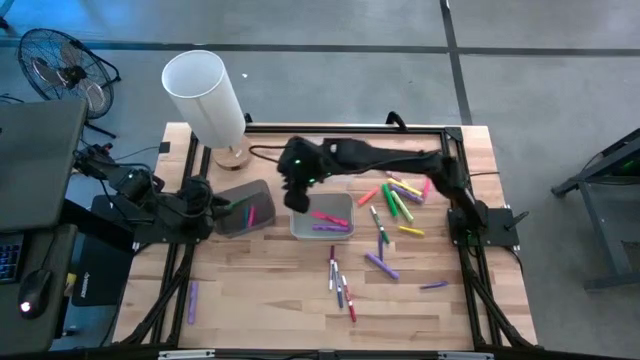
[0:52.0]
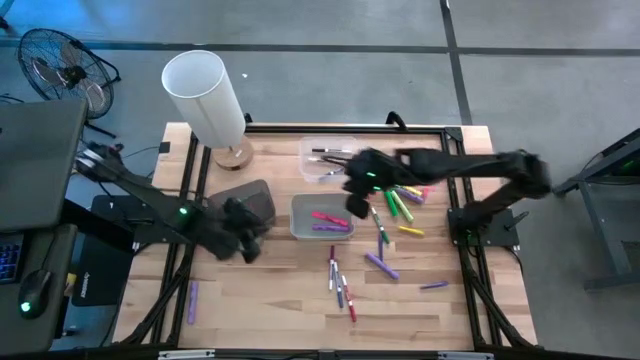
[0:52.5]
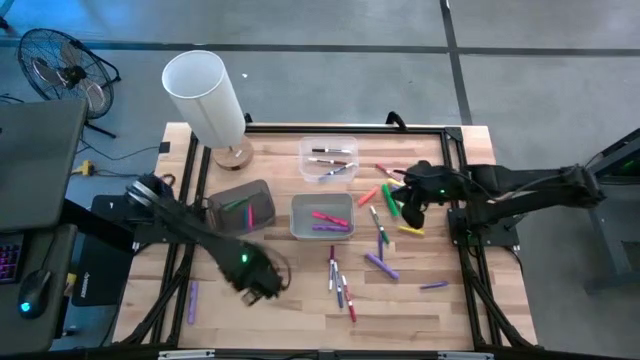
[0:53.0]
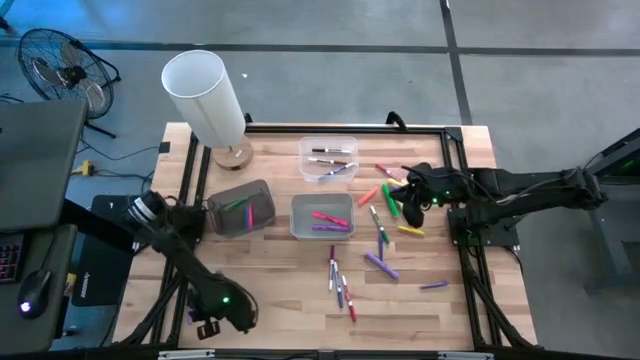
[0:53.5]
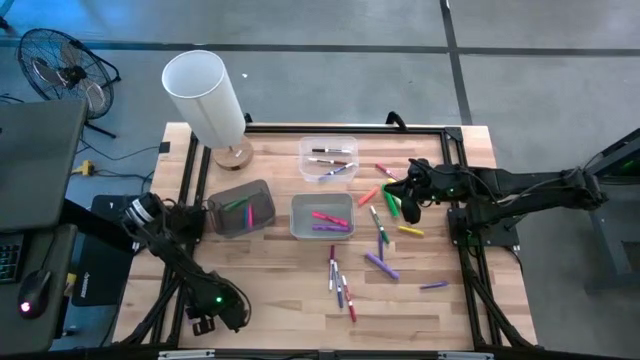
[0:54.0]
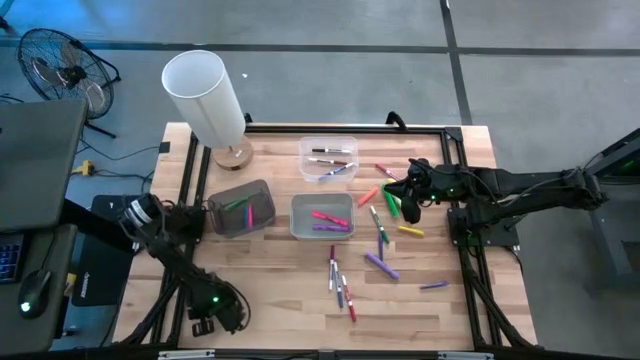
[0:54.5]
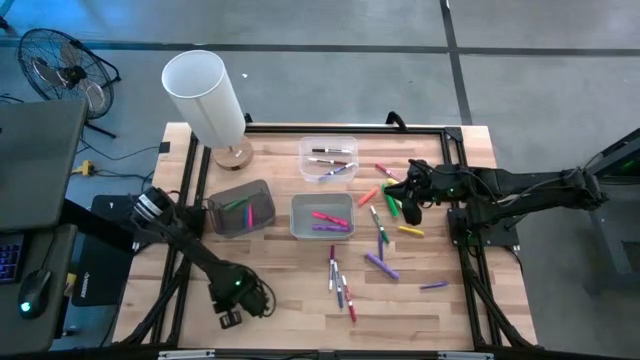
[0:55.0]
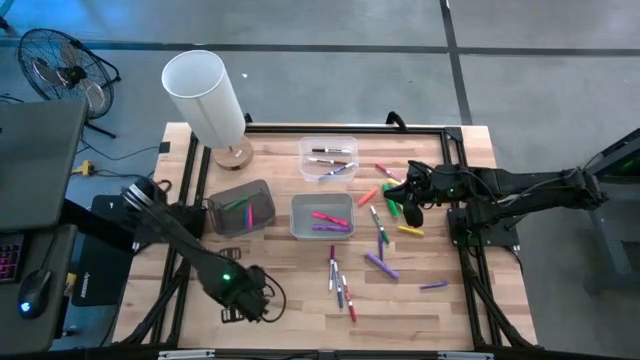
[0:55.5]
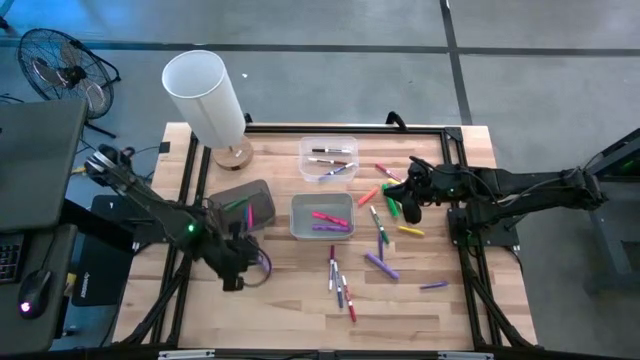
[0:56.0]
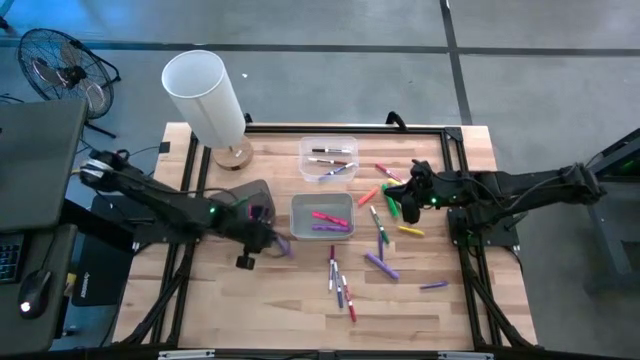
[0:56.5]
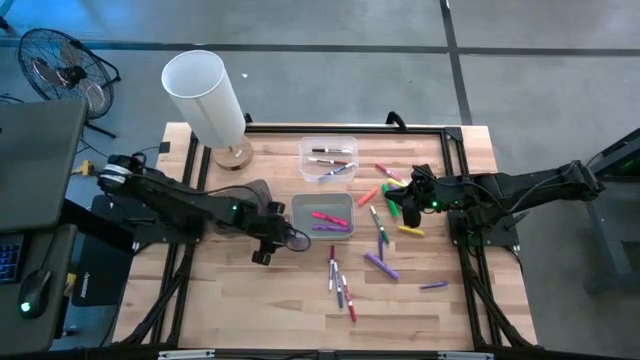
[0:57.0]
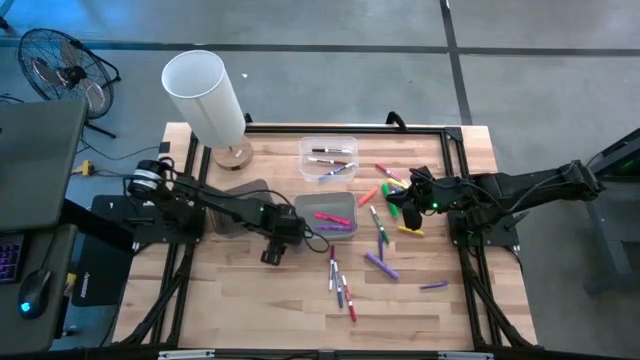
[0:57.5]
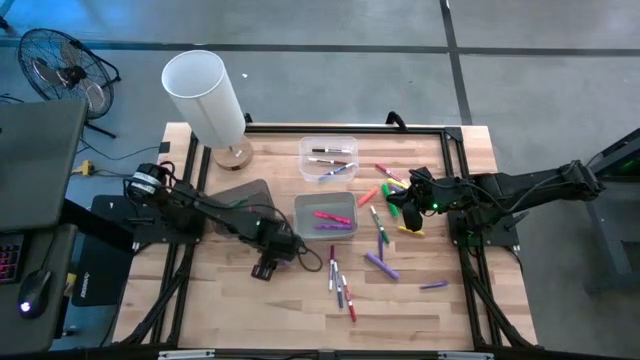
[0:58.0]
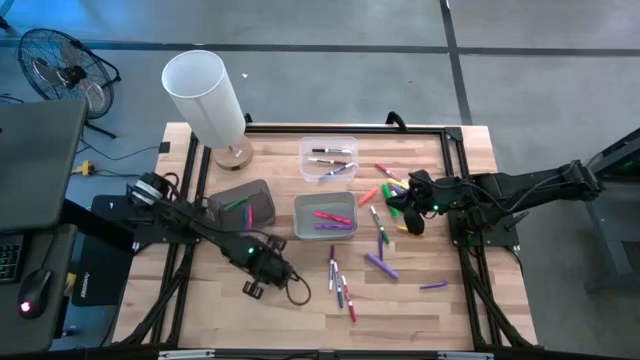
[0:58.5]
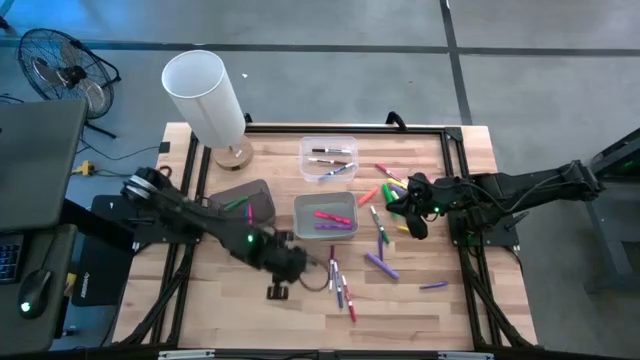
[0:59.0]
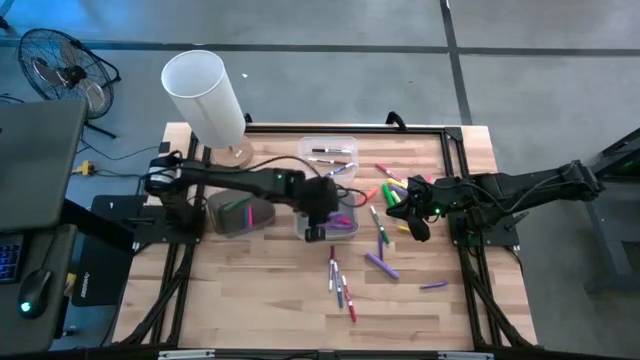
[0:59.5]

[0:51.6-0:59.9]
Task: Pick & Place Markers
Put the purple highlighter pen into the gray bin

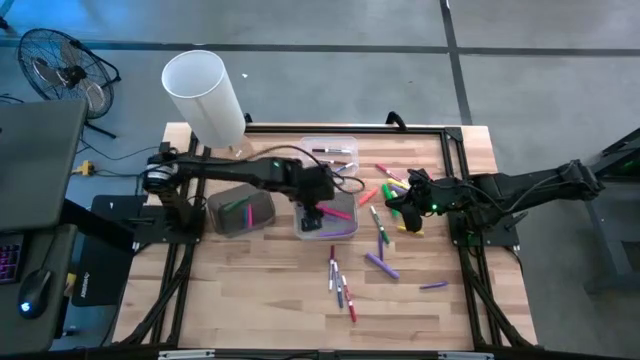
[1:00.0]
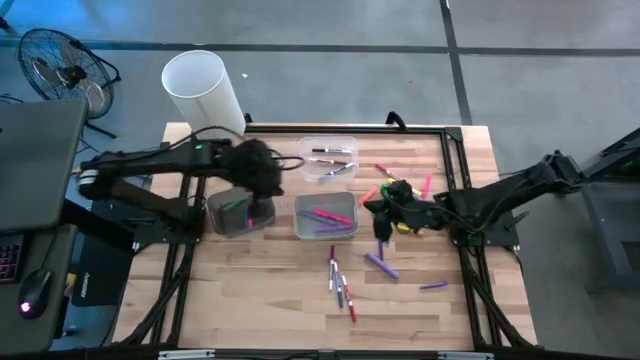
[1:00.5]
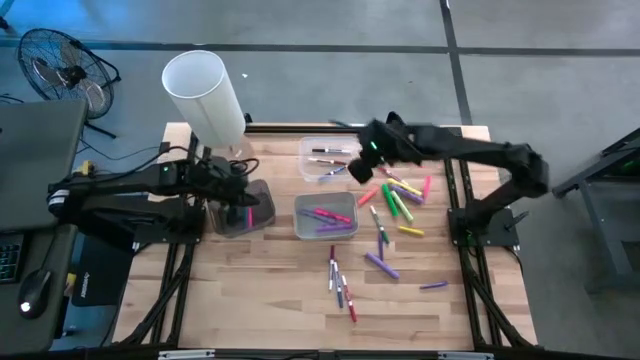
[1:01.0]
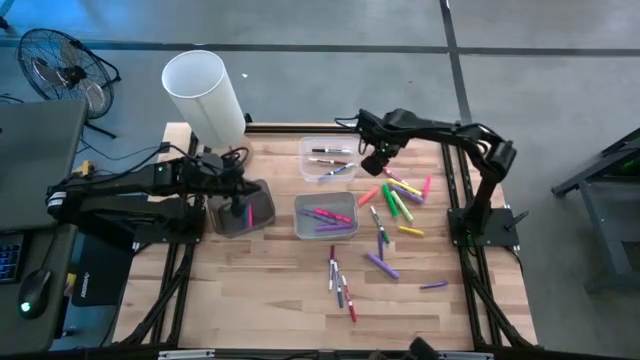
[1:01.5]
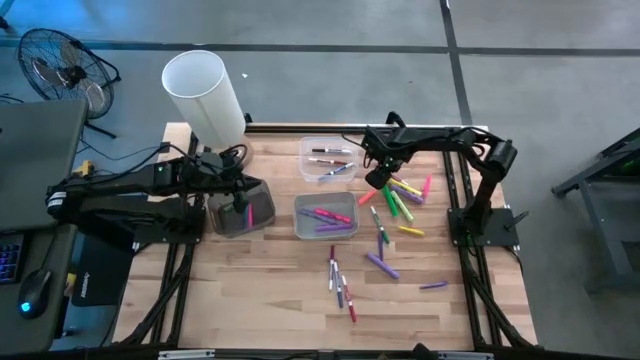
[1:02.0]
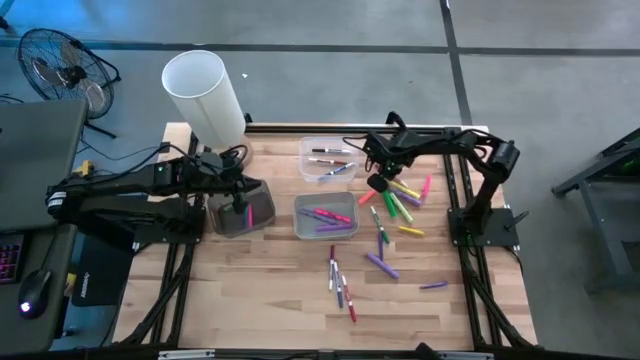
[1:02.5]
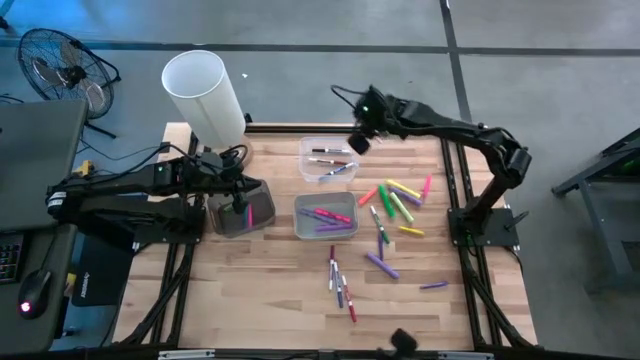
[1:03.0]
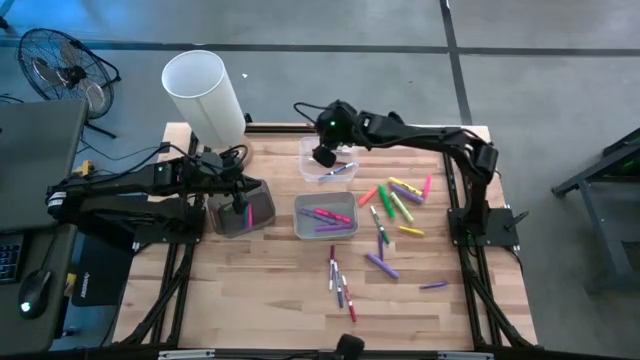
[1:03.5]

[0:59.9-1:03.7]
Put the pink marker pen into the transparent bin

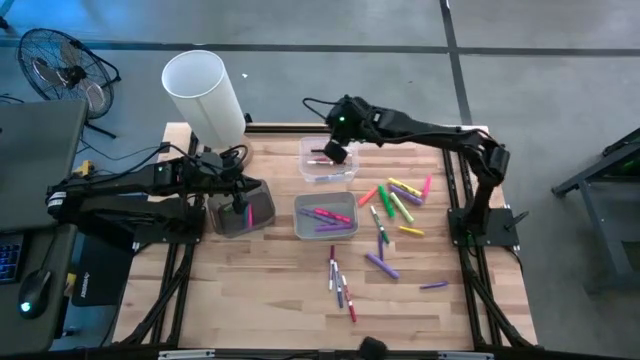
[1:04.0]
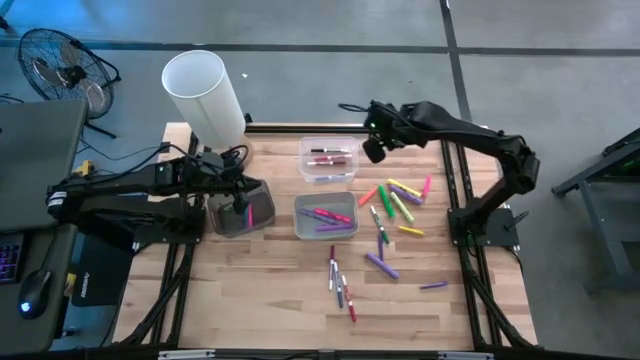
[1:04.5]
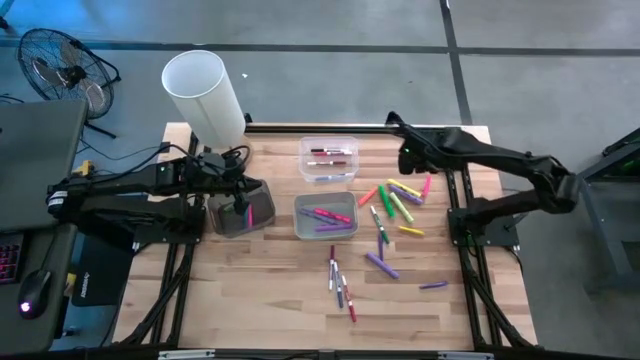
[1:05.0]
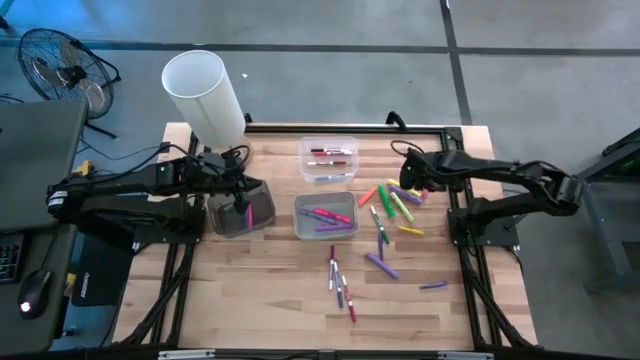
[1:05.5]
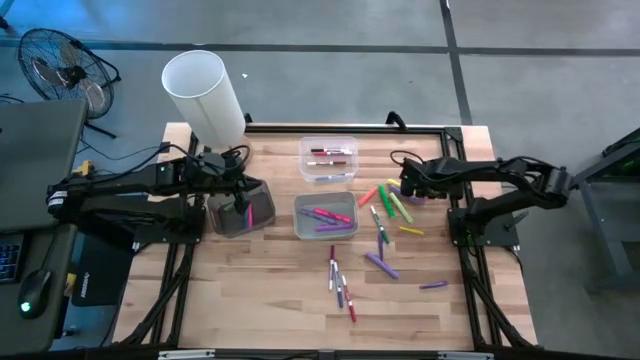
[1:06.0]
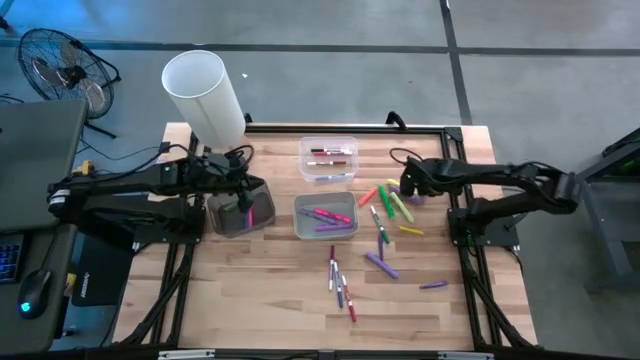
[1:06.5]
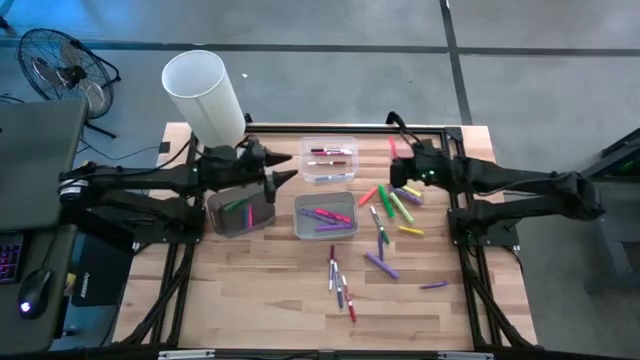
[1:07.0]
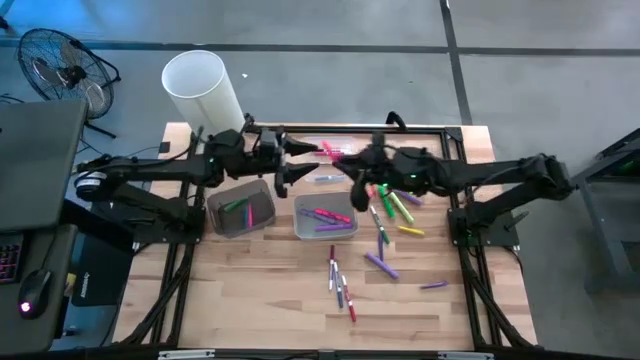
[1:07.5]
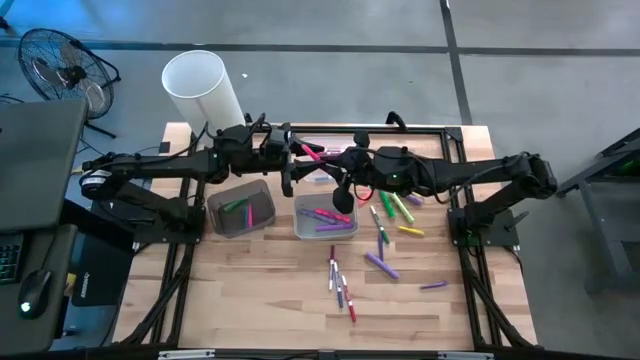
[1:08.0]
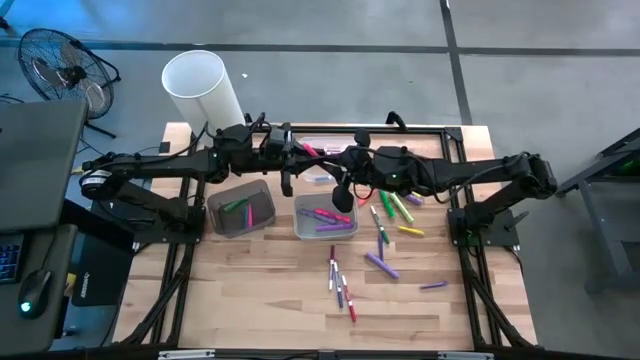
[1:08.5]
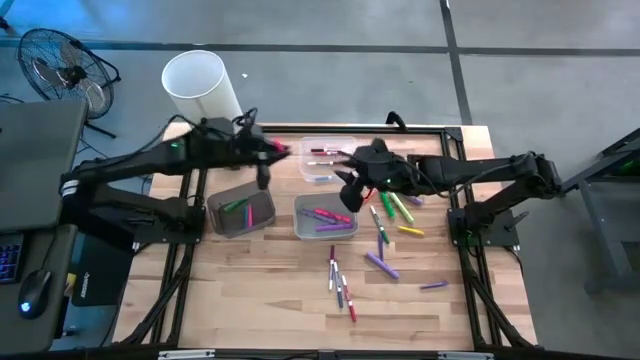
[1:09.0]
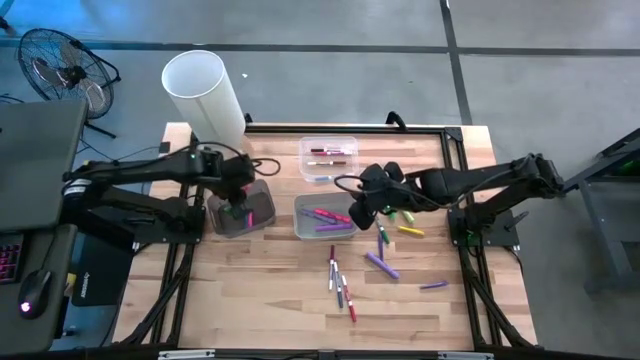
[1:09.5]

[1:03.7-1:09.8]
Put the pink pen into the black bin

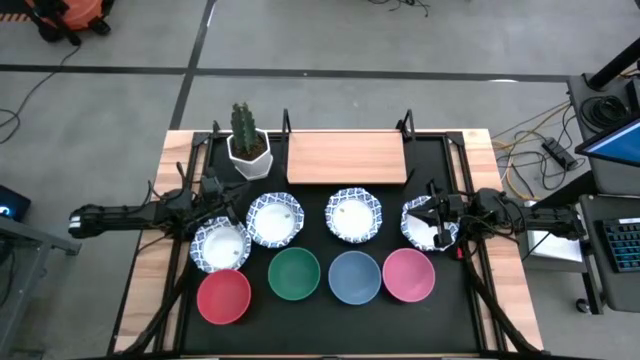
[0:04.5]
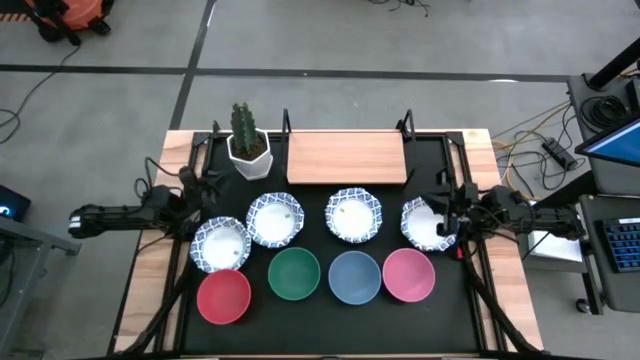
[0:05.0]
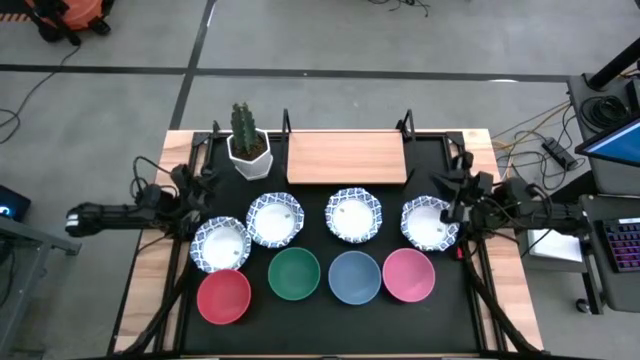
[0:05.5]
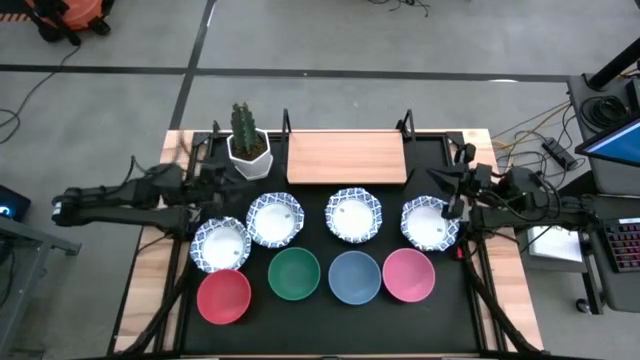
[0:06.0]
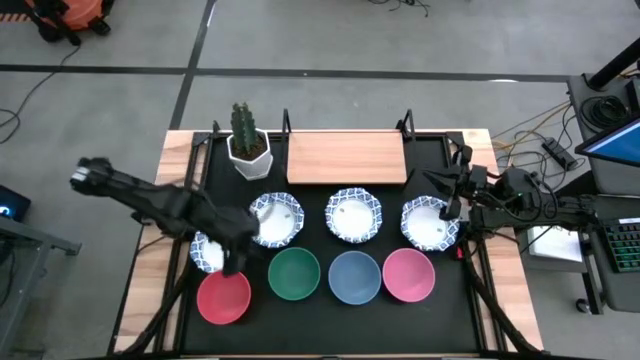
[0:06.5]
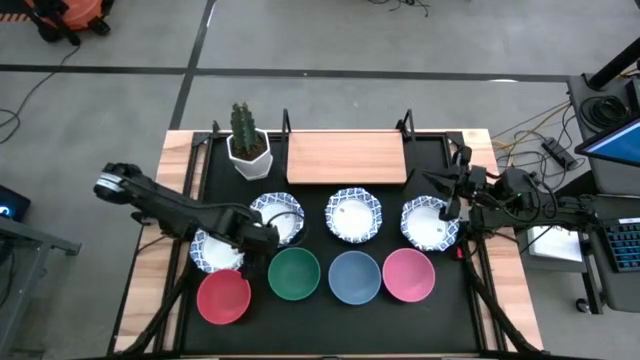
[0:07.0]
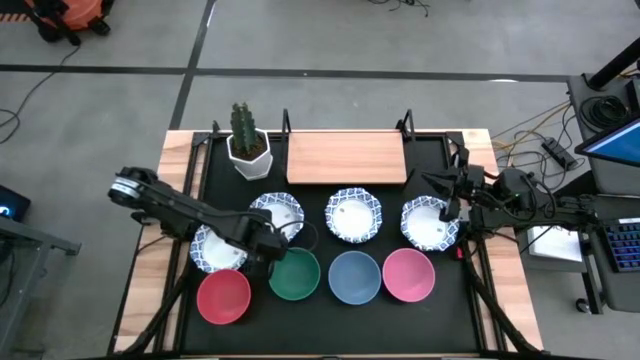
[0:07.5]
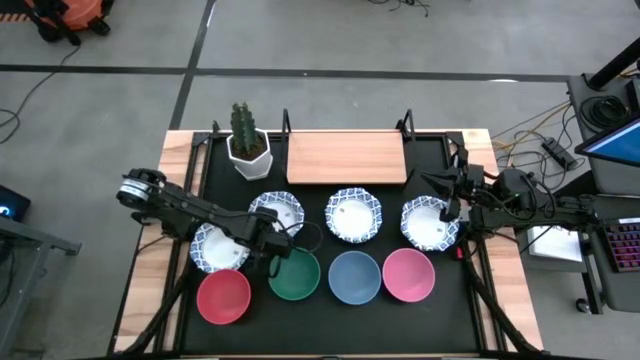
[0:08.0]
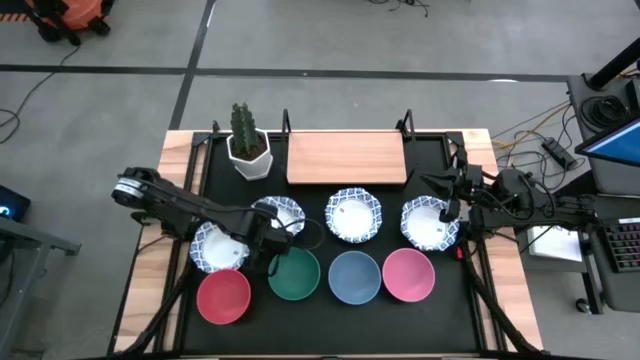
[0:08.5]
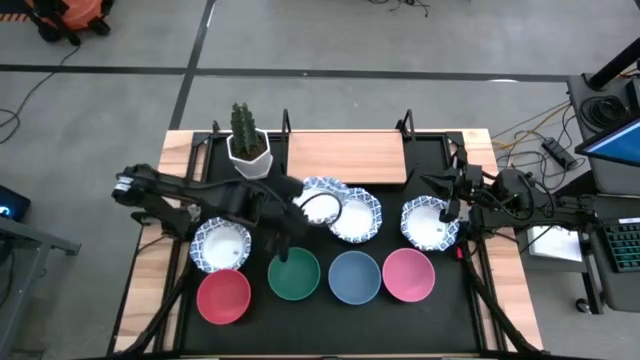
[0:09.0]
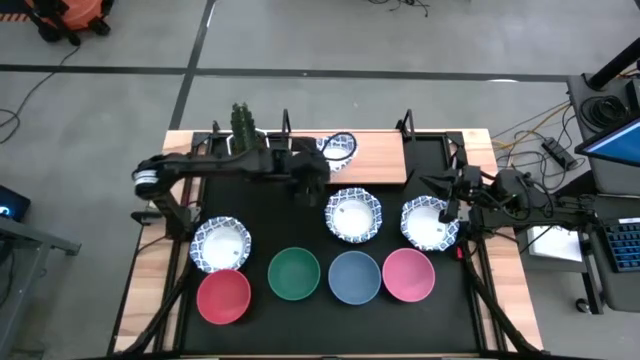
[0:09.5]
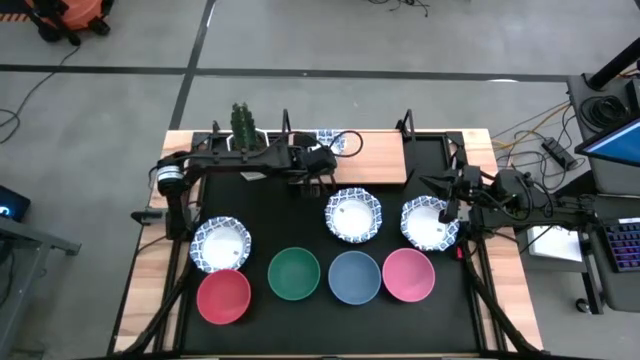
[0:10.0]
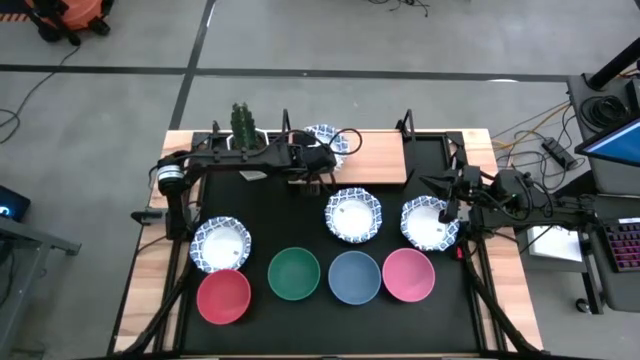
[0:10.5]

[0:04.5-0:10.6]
Task: Place and stack bowls onto a shelf
Put the white patterned bowl on the shelf
